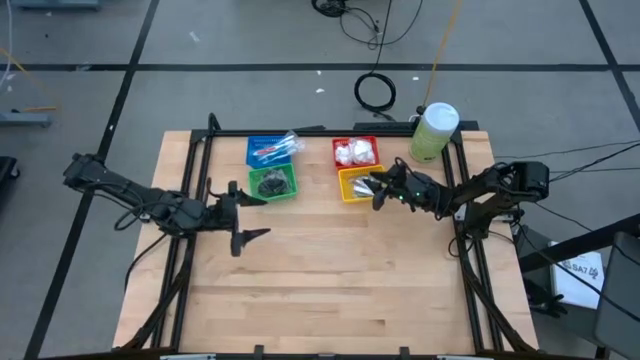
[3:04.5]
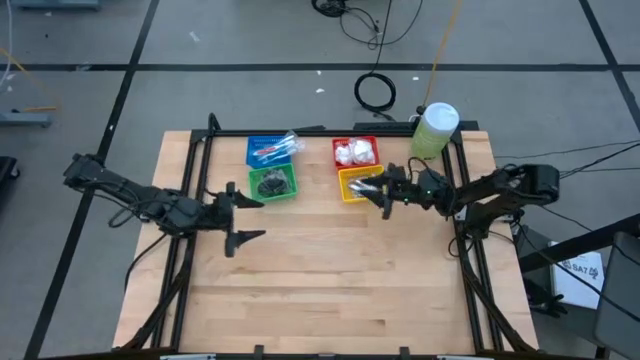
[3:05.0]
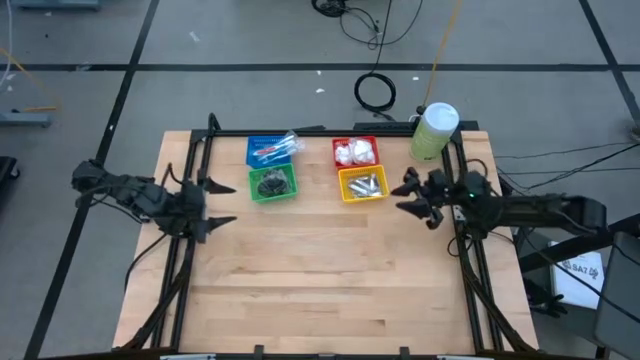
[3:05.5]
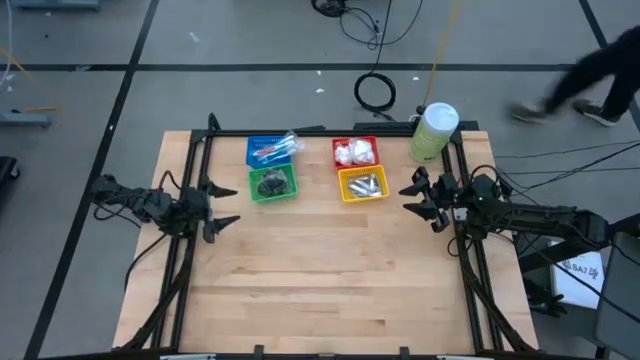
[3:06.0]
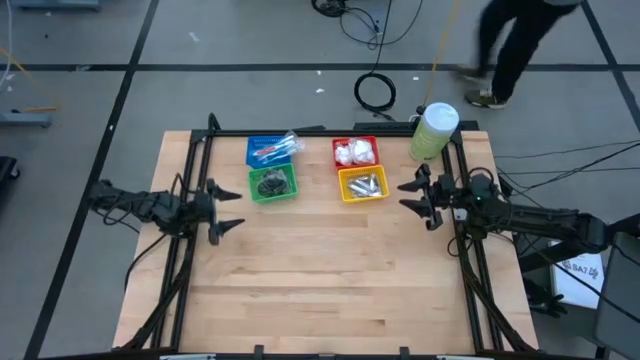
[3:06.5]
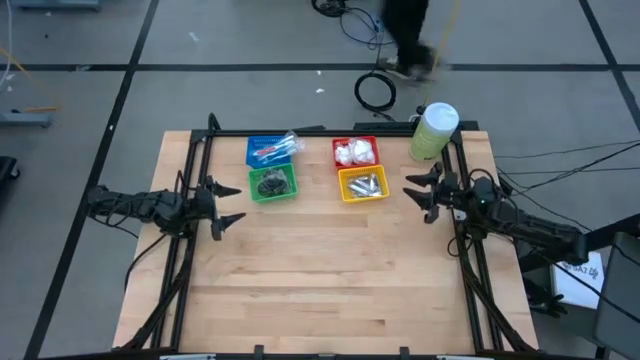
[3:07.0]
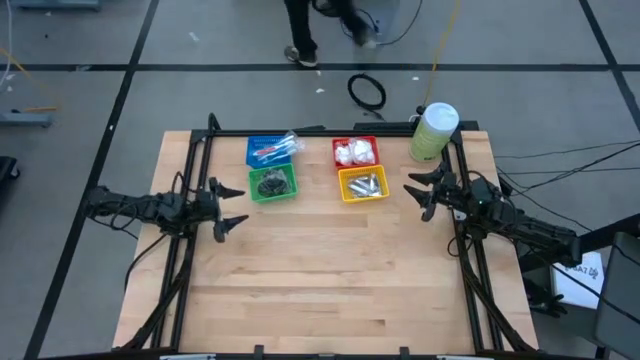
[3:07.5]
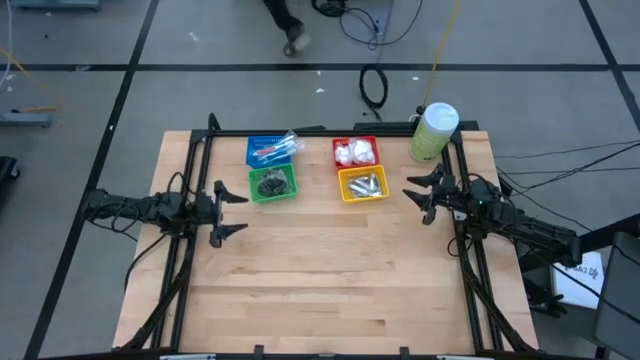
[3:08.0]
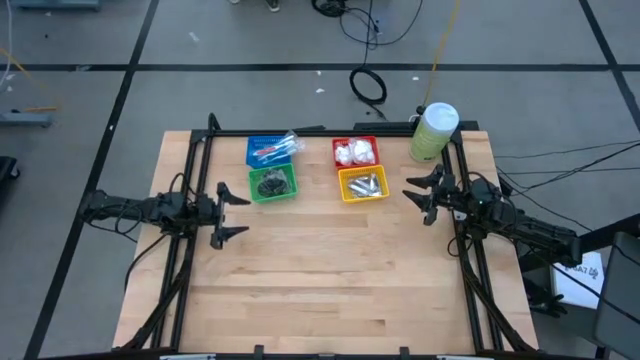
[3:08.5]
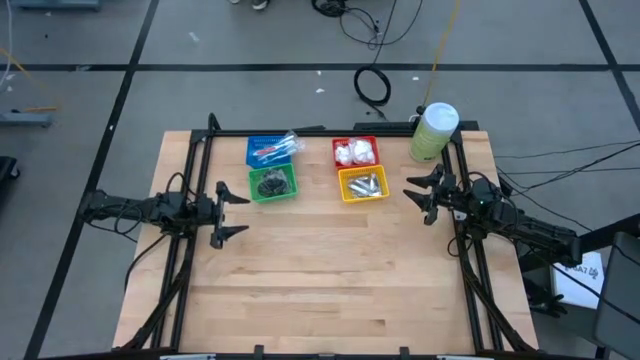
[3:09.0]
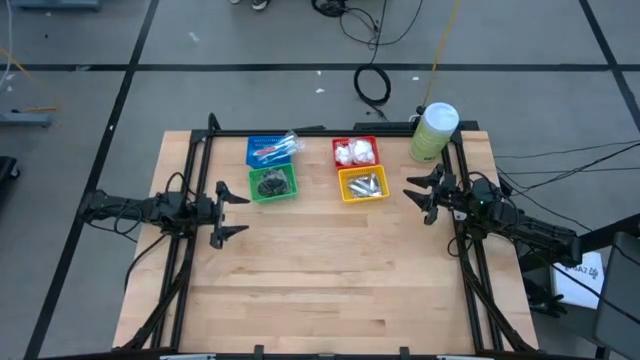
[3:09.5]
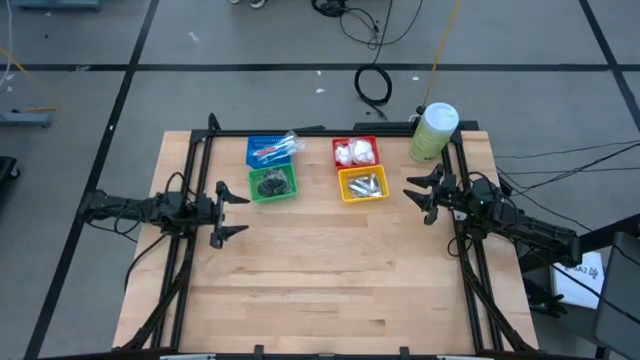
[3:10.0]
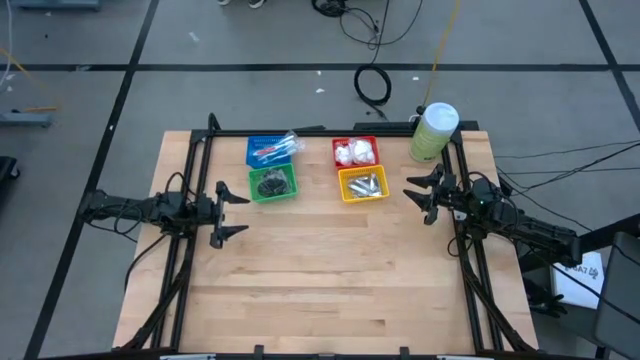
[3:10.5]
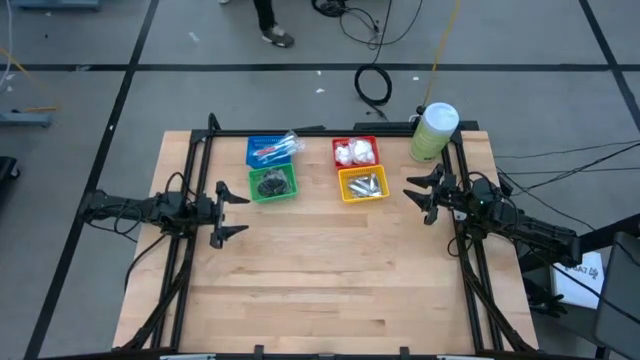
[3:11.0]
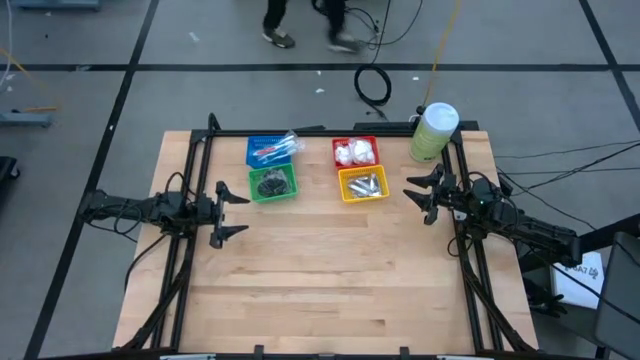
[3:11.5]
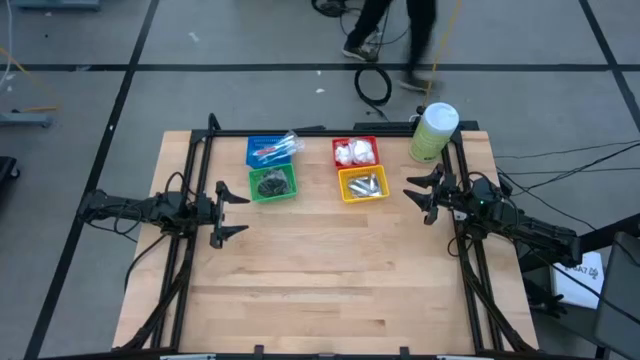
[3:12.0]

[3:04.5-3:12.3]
Task: Pick & Place Travel size toiletries
Return to Home Position

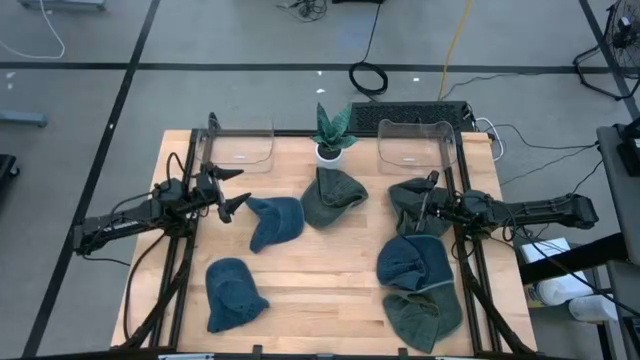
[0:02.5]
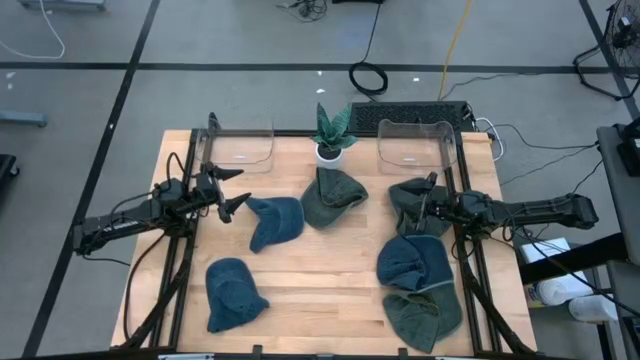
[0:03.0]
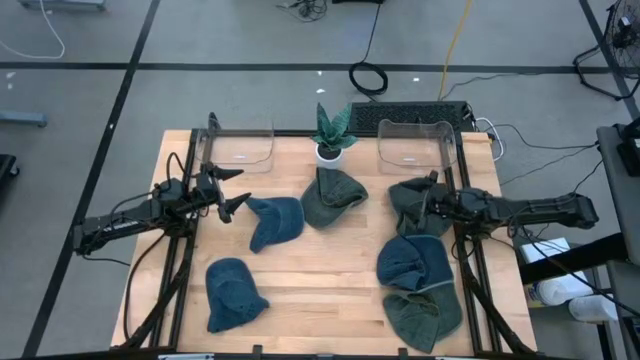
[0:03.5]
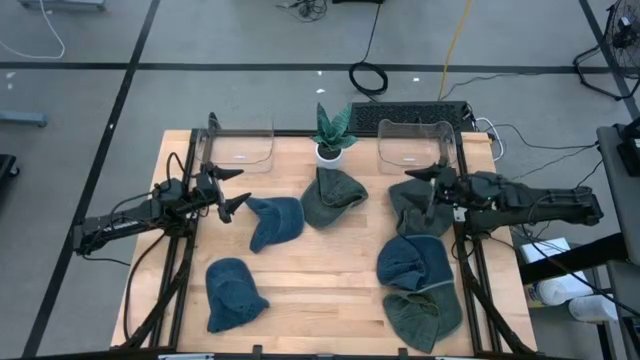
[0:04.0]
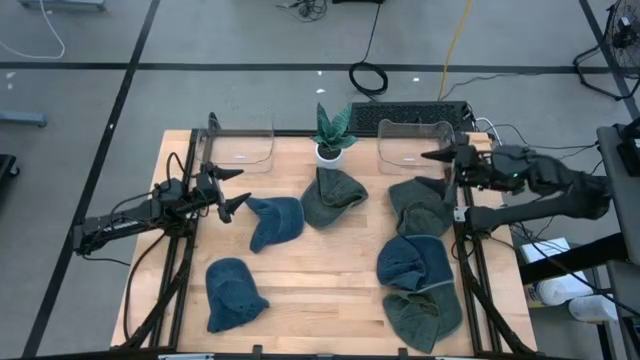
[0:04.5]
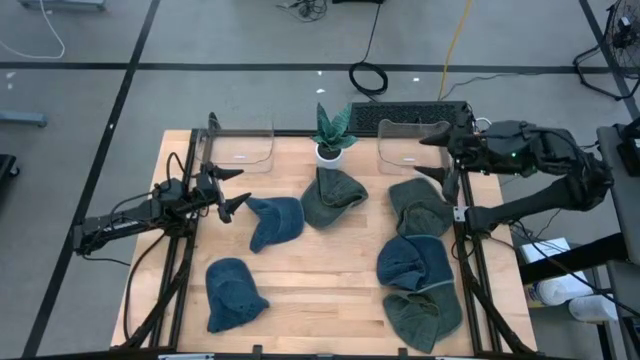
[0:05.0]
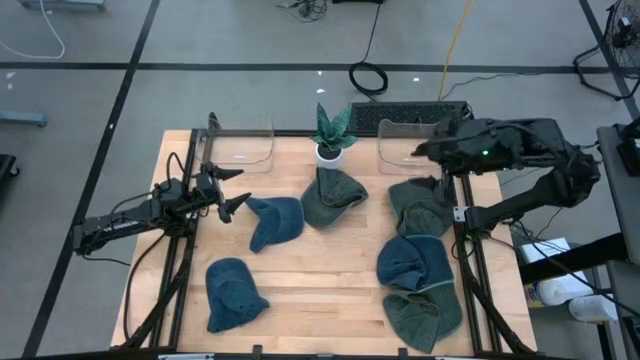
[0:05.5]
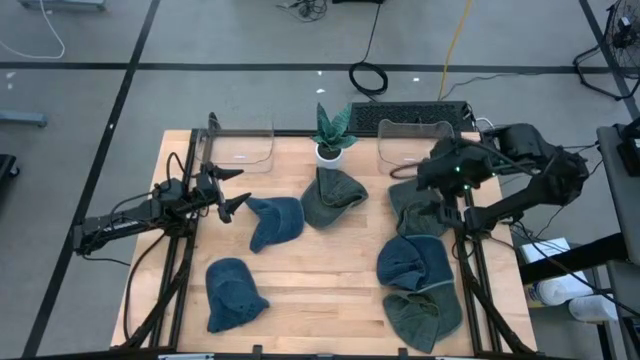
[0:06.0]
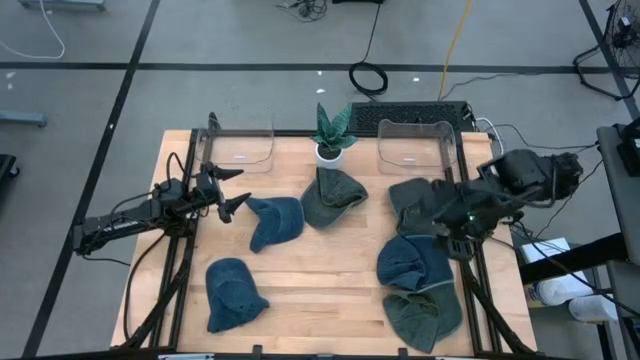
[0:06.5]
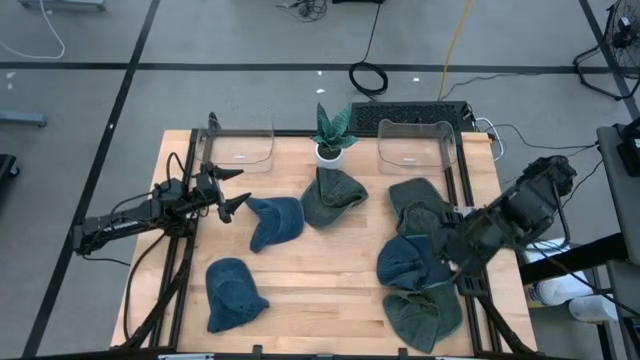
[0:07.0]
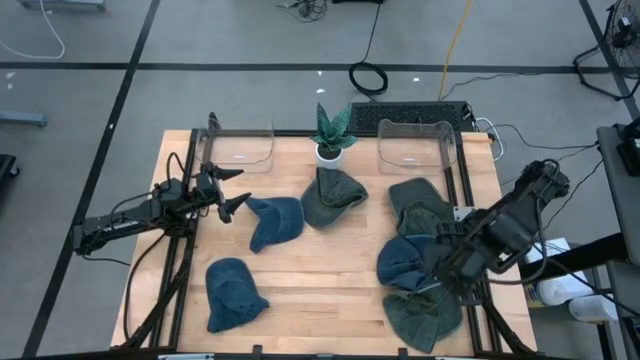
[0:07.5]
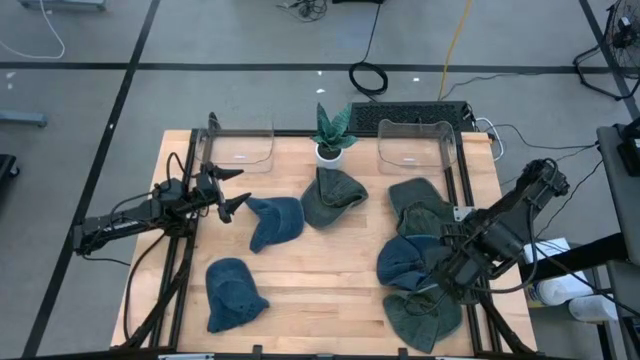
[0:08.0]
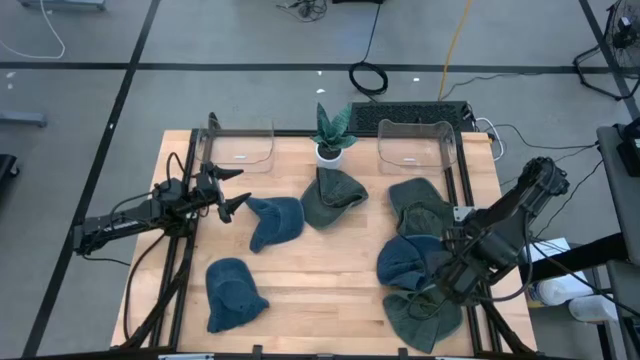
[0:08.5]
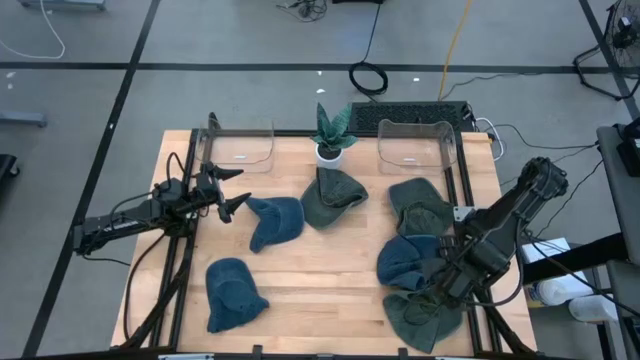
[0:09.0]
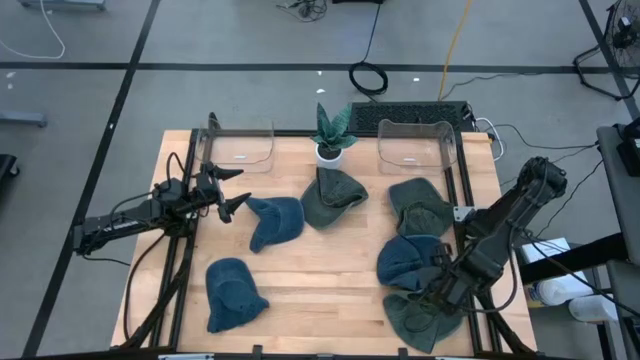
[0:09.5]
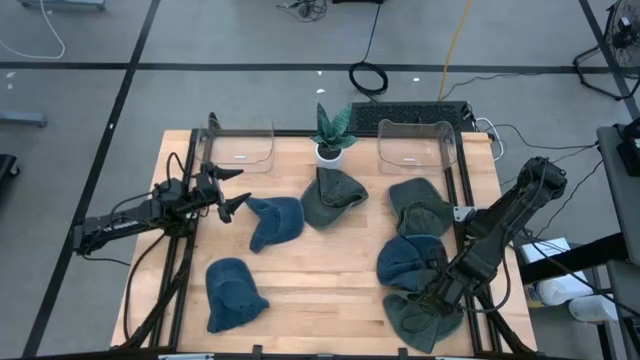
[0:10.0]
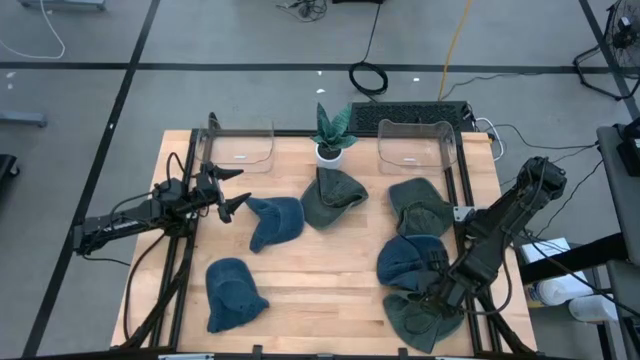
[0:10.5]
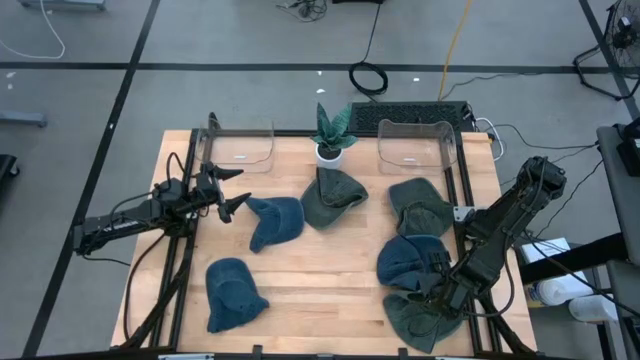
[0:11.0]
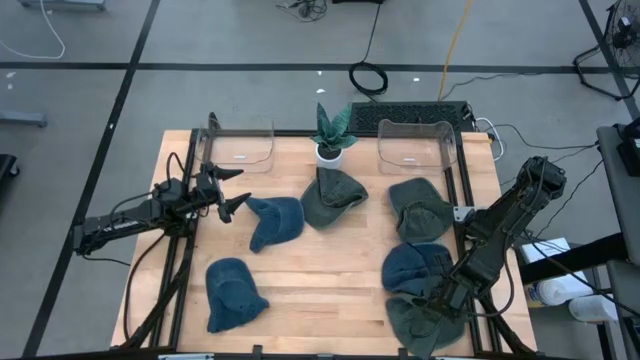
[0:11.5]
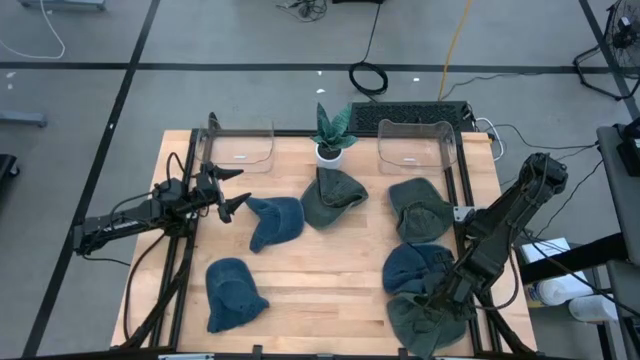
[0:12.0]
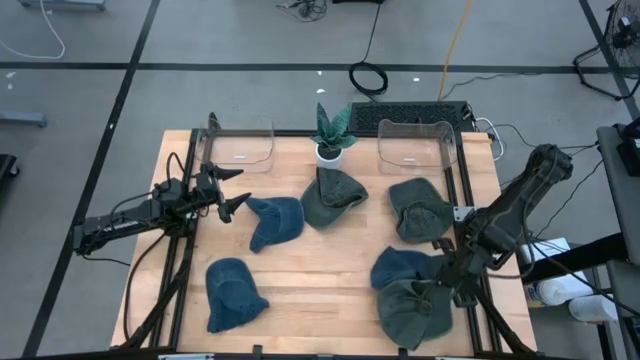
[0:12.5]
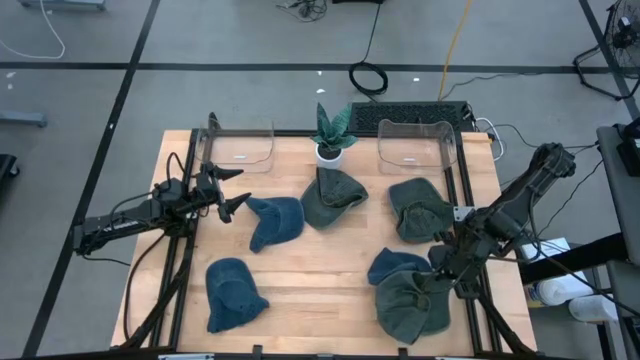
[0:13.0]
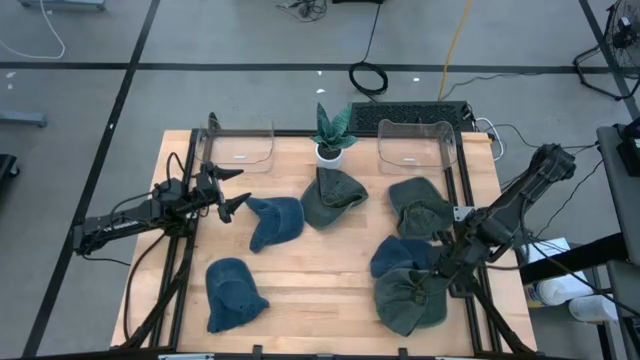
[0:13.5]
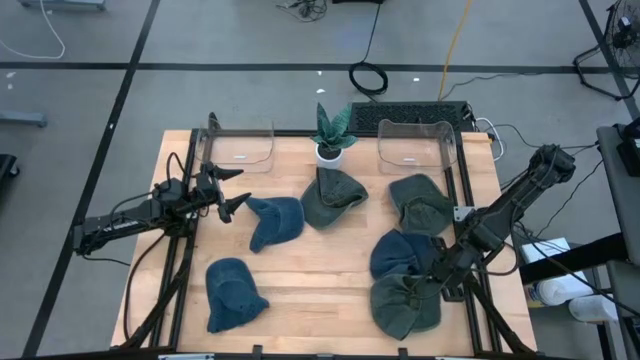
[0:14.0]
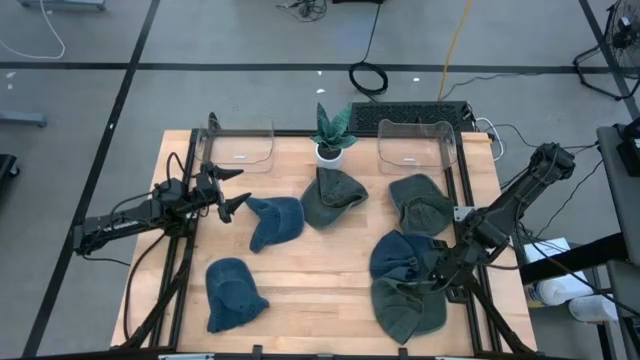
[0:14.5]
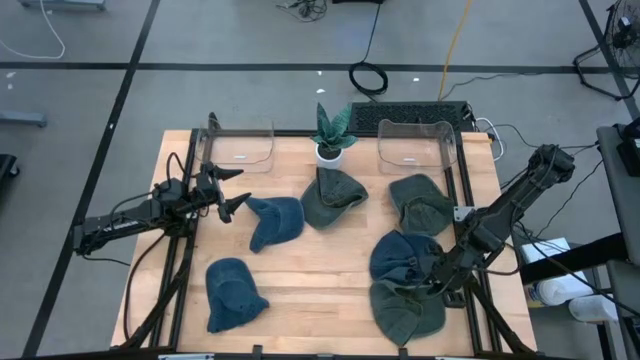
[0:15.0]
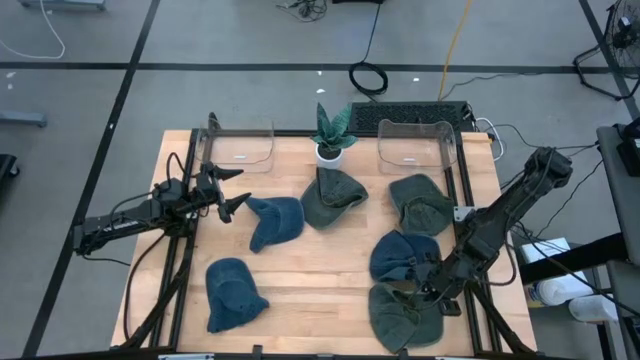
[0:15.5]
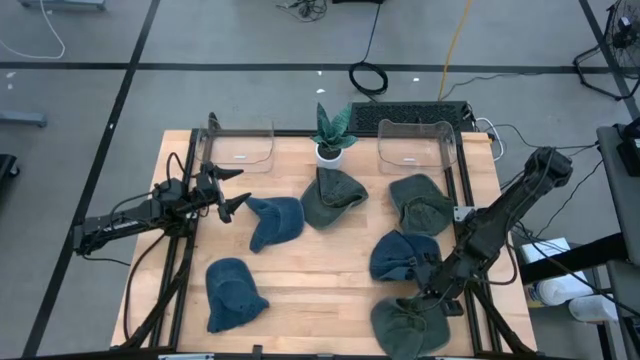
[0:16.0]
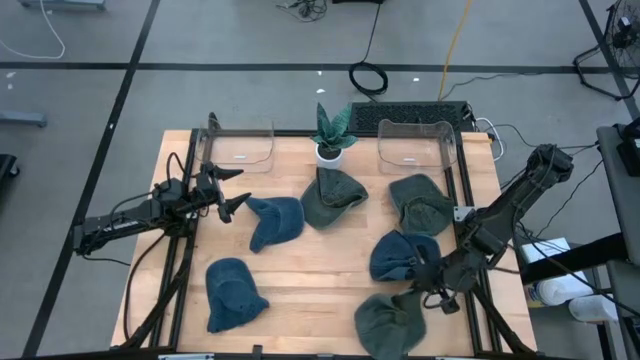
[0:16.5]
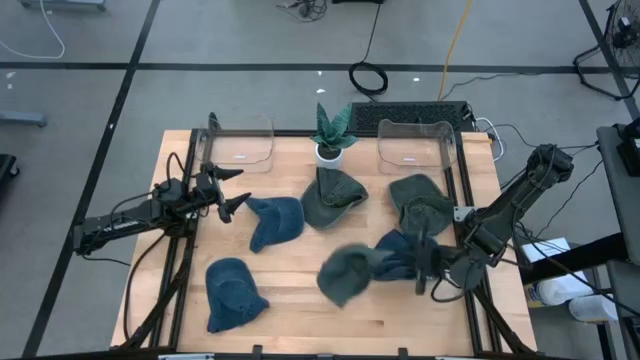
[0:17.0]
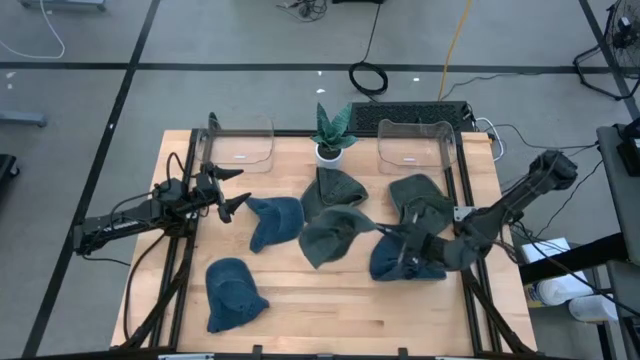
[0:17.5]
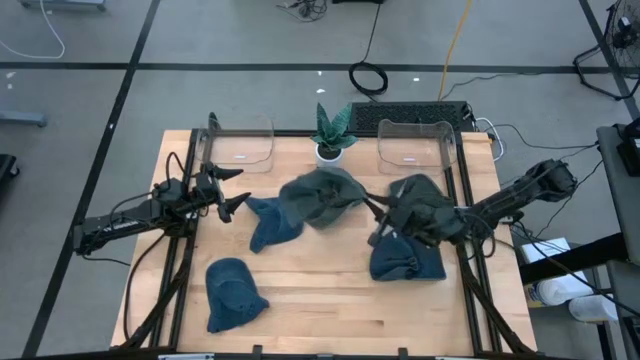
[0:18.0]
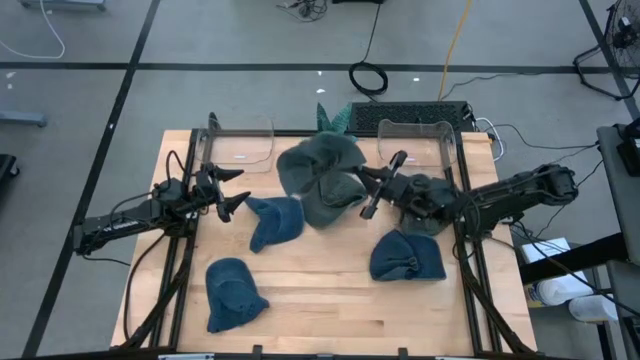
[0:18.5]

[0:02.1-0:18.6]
Task: Pick & Place hat
Put the bottom right green cap into the left transparent bin
